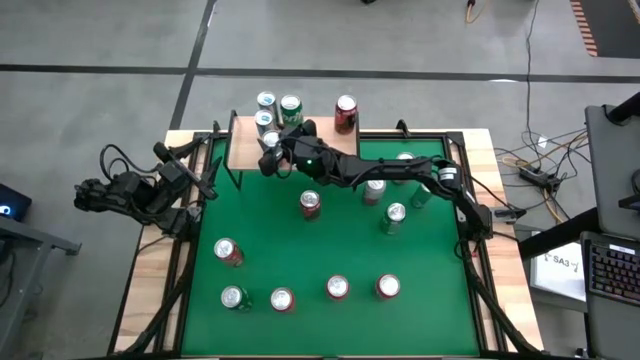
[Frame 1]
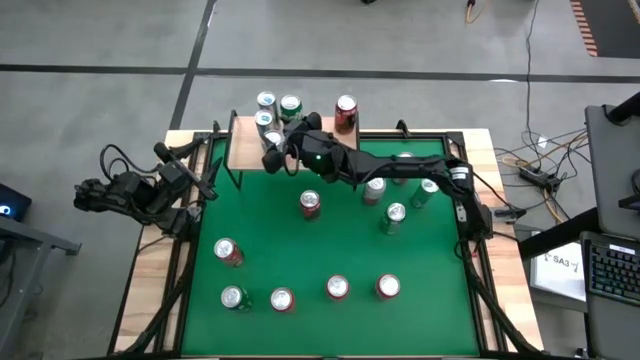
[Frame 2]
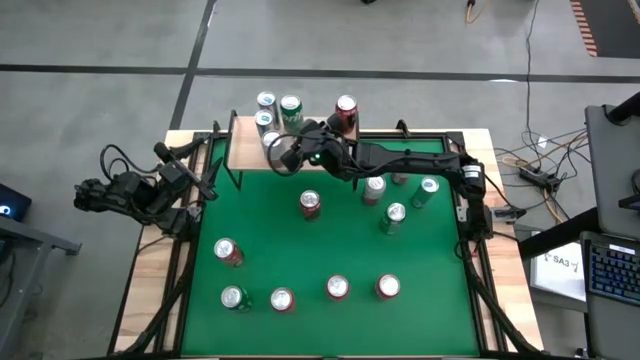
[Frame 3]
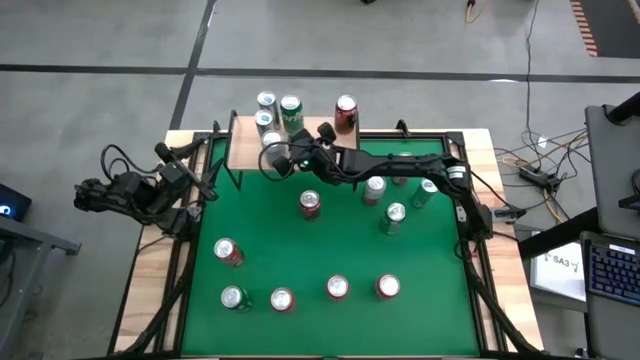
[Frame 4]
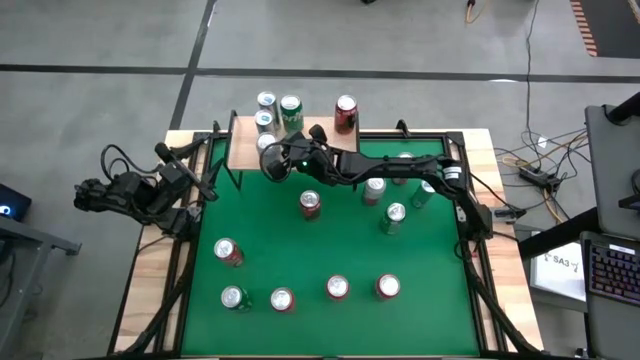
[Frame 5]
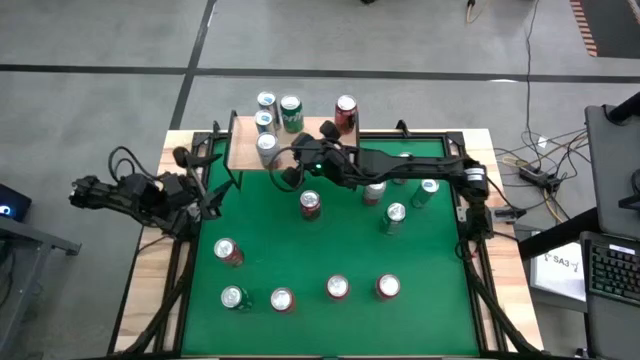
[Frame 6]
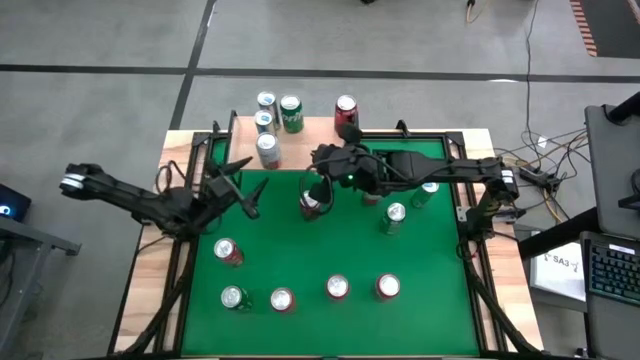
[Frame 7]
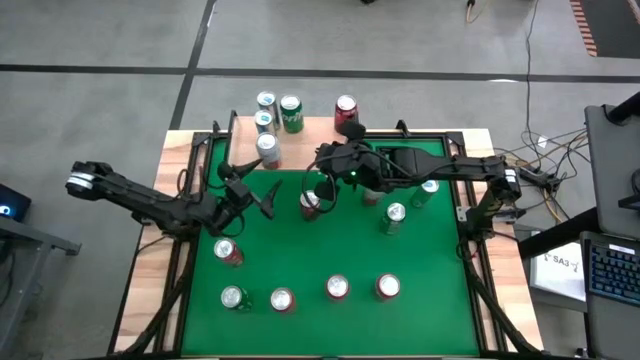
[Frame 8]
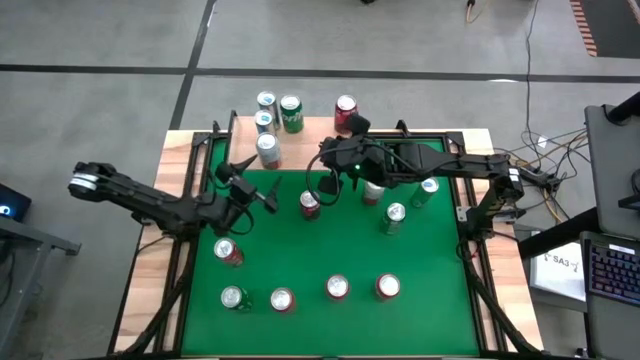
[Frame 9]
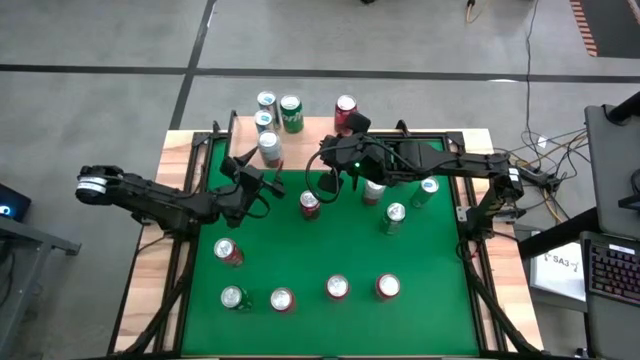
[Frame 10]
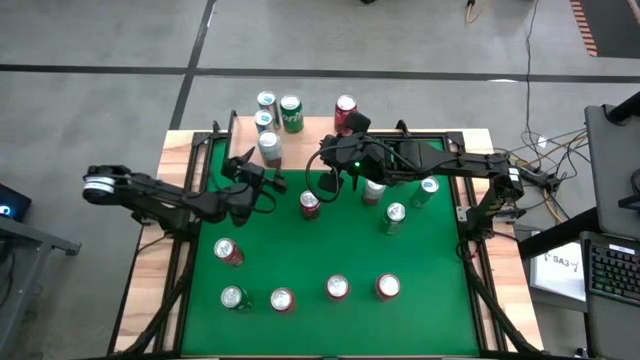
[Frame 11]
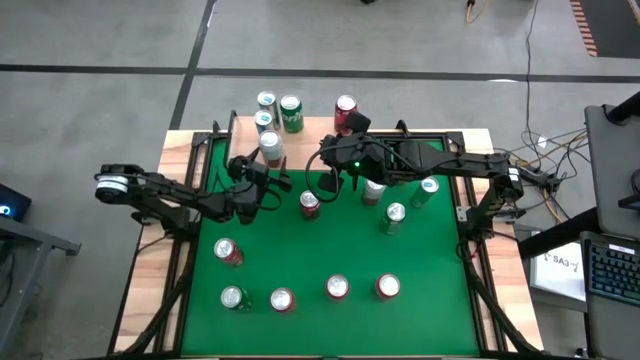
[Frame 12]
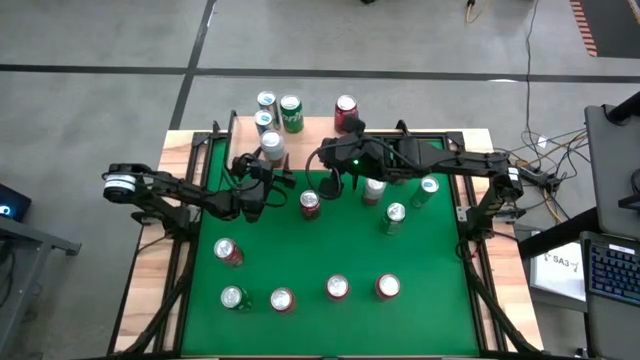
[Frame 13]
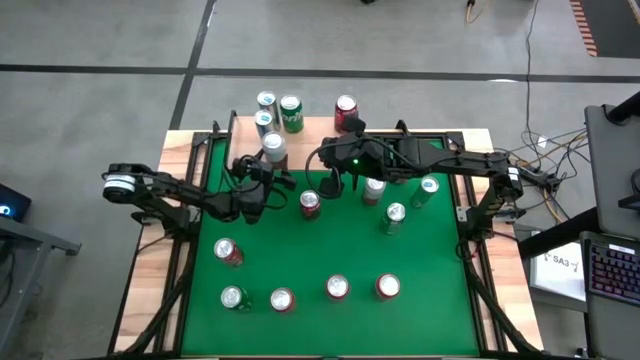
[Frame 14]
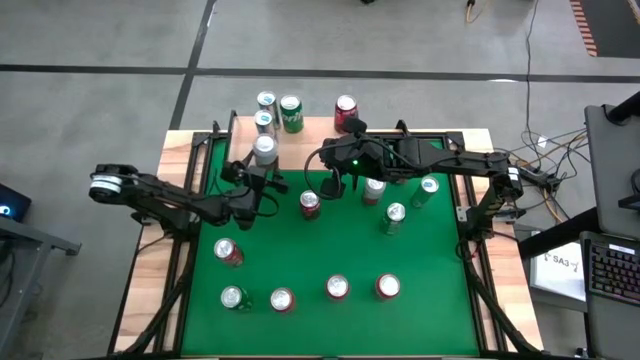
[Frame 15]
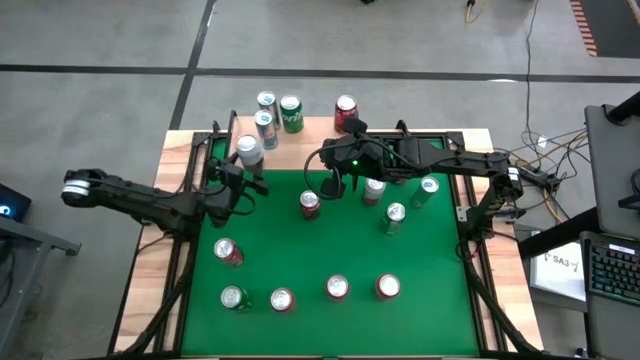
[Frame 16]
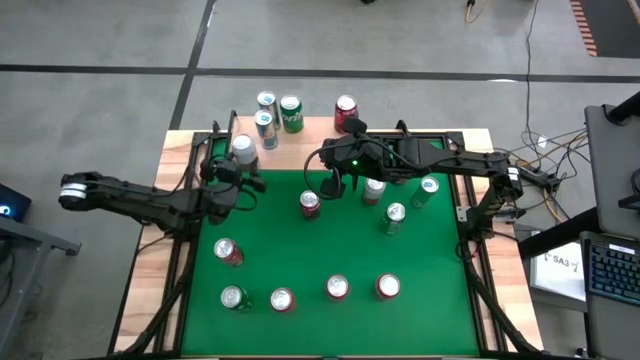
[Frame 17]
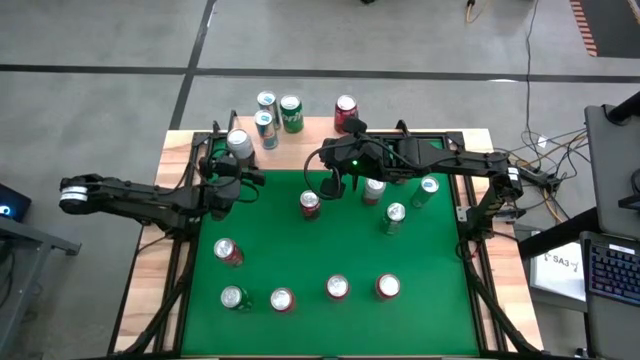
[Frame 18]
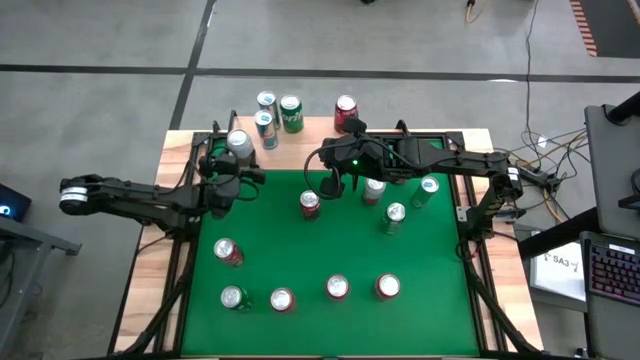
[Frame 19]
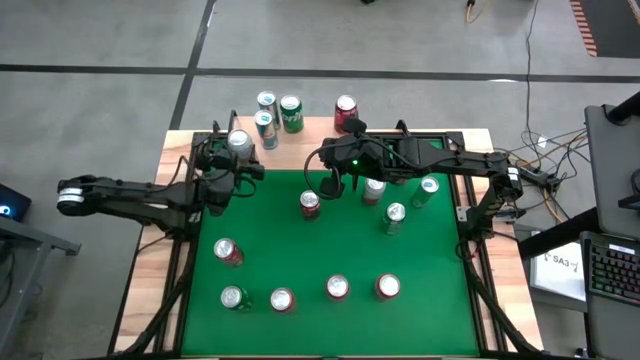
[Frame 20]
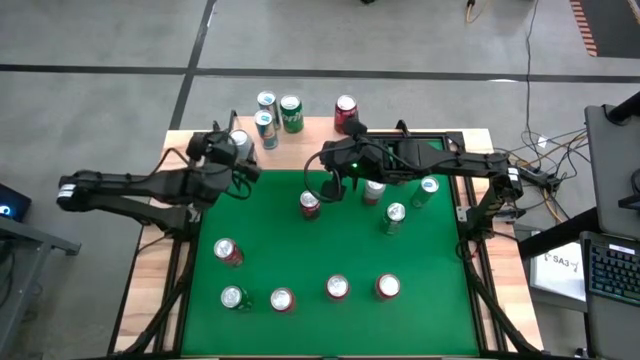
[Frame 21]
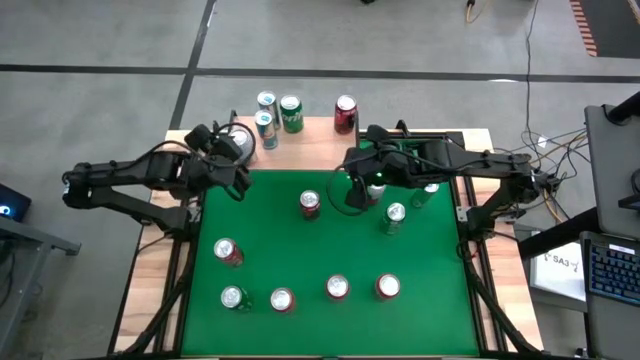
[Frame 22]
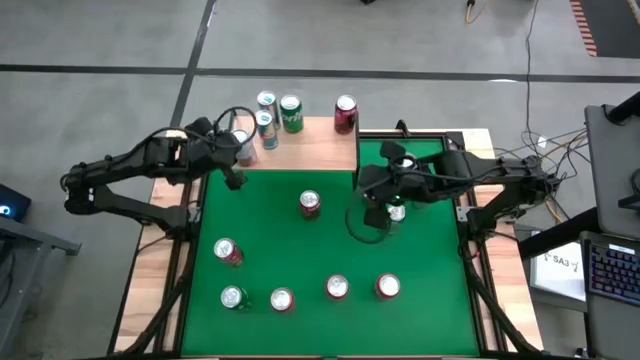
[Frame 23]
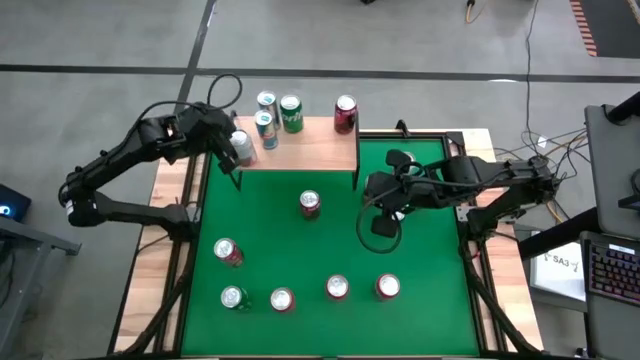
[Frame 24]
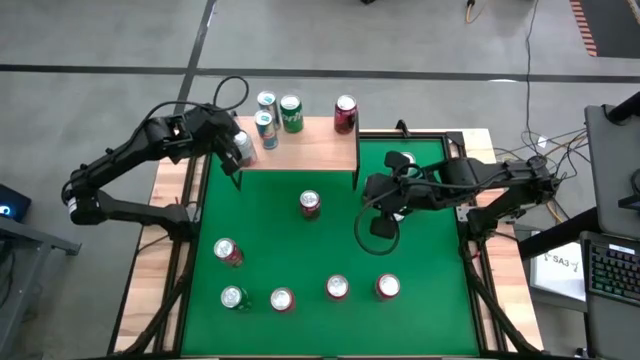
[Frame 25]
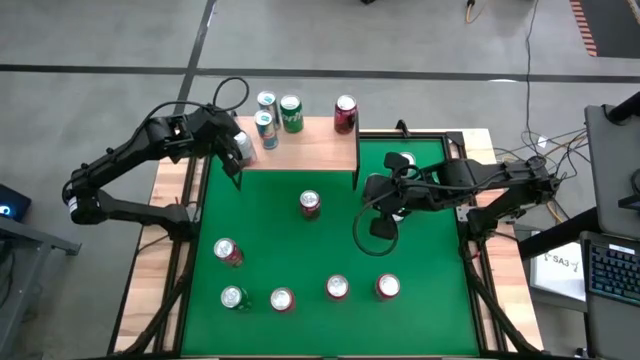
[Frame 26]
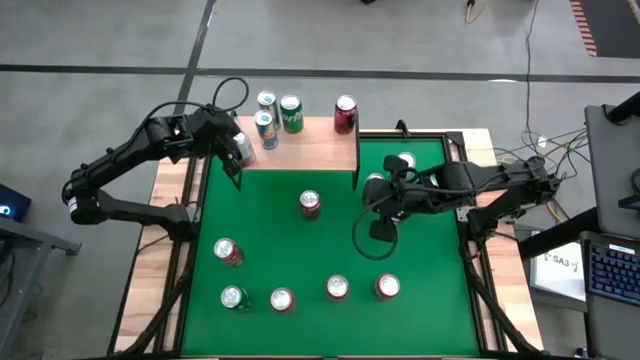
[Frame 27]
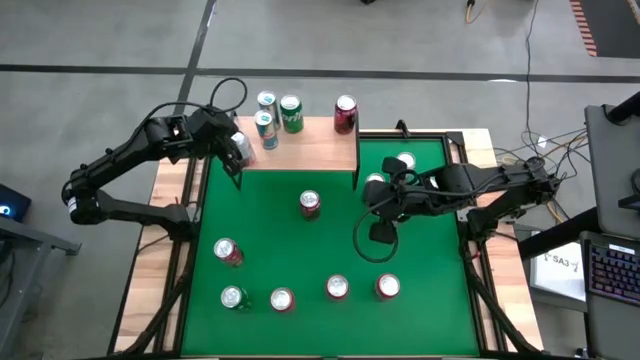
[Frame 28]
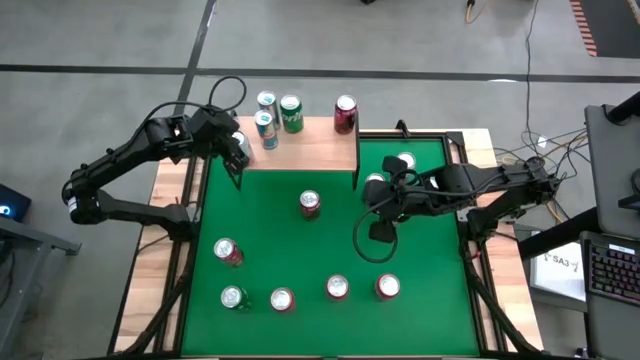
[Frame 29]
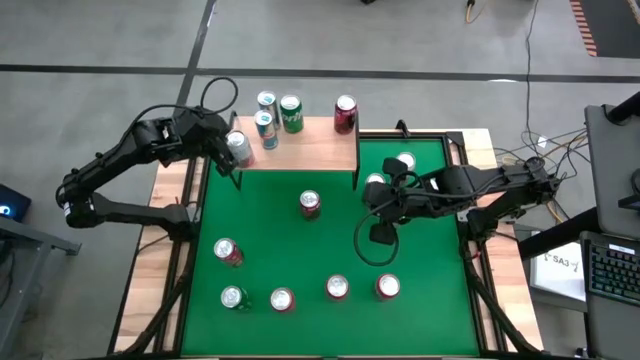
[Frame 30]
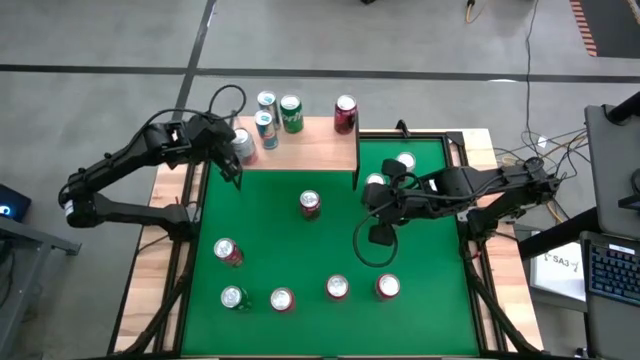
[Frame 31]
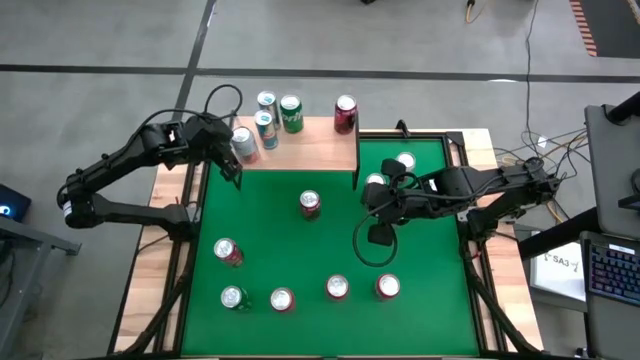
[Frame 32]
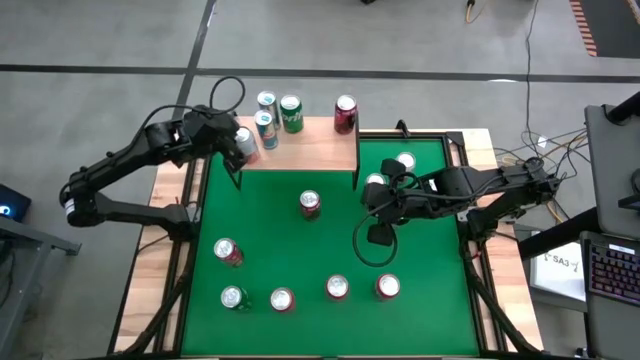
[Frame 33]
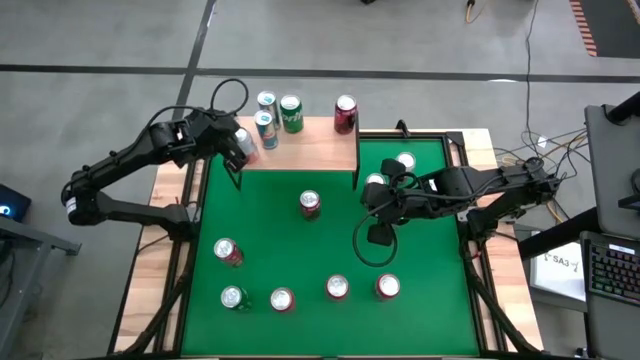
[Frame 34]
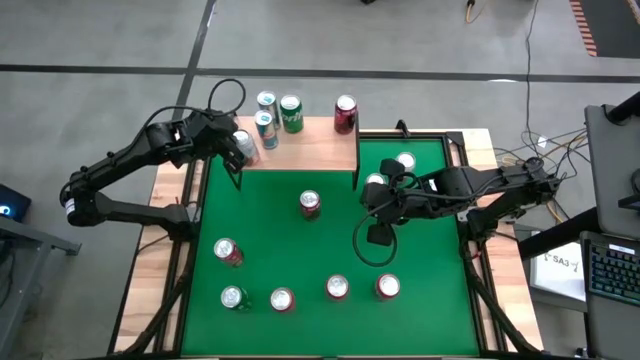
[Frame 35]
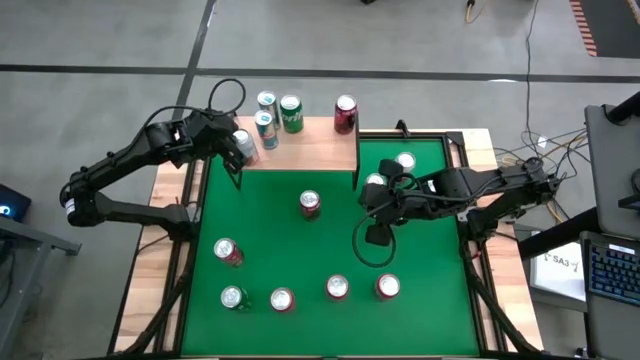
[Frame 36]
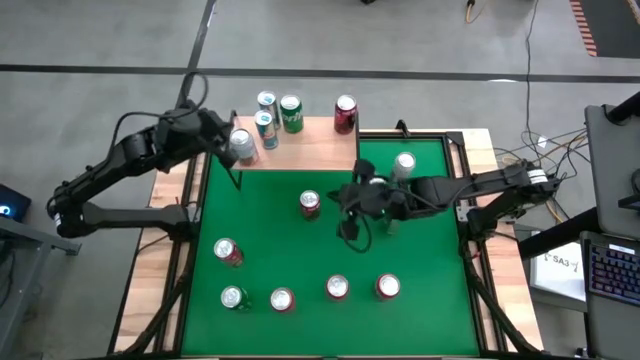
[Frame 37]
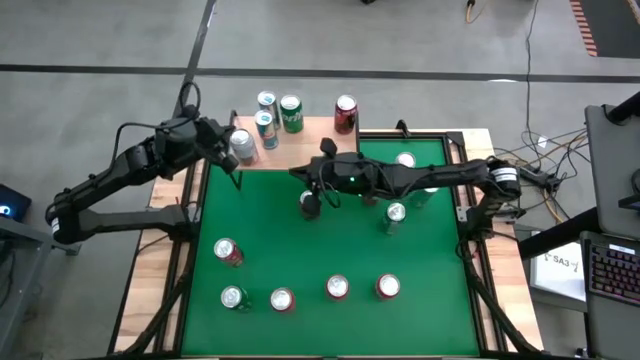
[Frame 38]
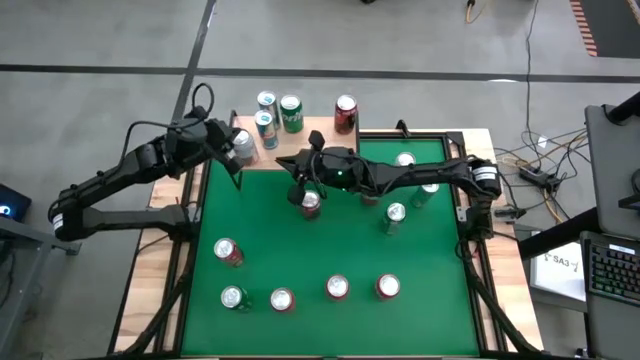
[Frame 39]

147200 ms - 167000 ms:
Task: Place canned beverage on shelf
Put the green can on the shelf
